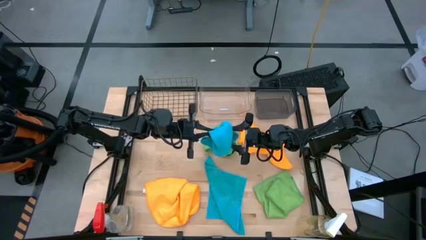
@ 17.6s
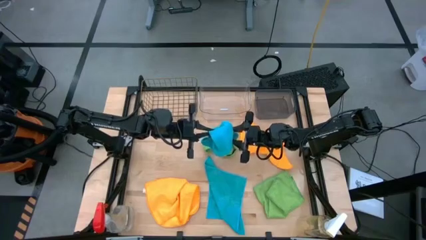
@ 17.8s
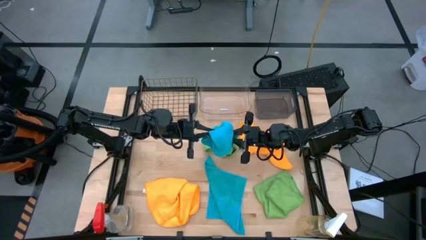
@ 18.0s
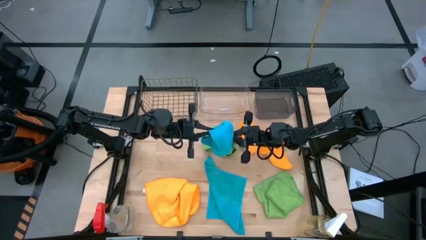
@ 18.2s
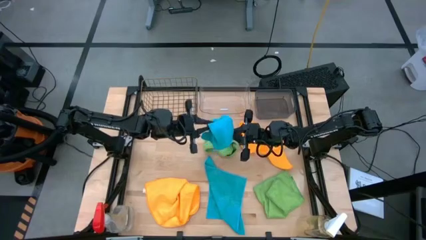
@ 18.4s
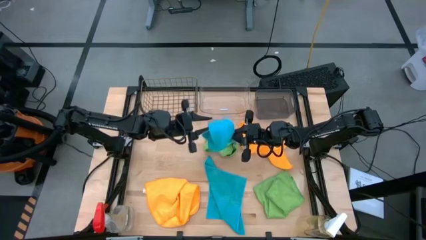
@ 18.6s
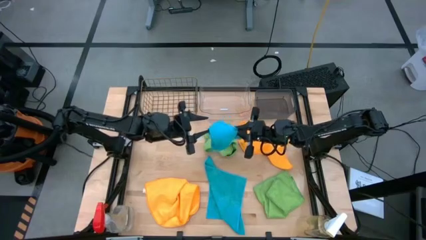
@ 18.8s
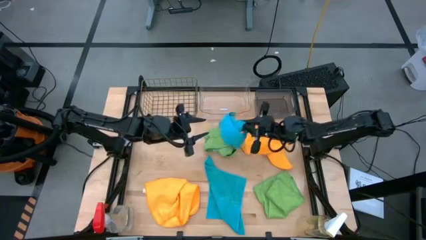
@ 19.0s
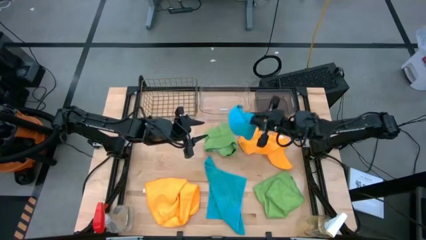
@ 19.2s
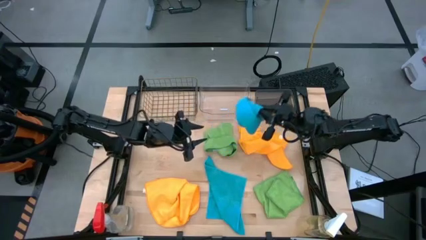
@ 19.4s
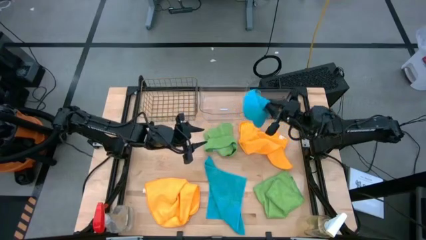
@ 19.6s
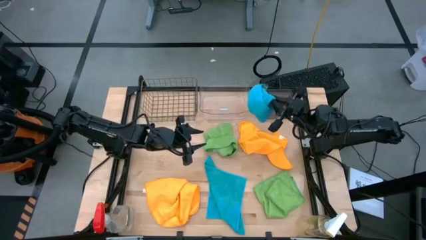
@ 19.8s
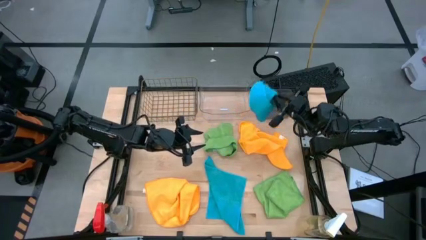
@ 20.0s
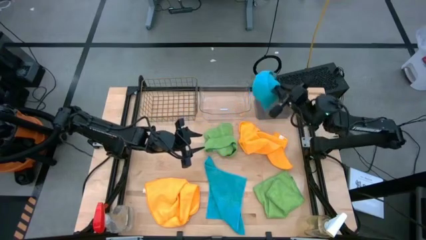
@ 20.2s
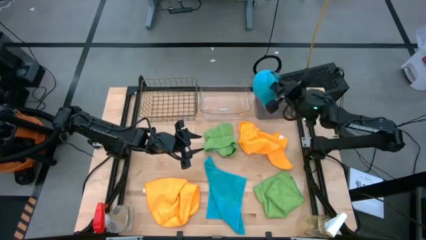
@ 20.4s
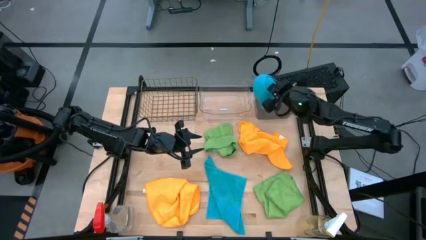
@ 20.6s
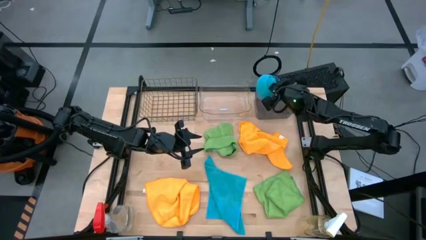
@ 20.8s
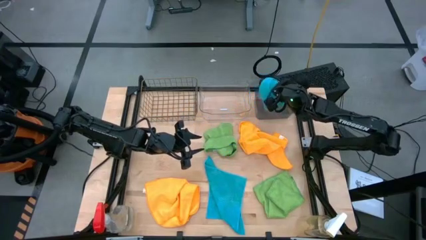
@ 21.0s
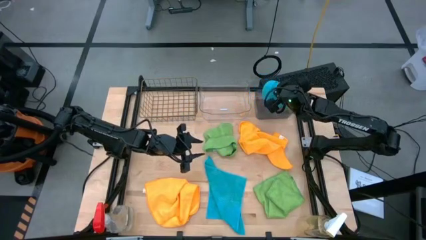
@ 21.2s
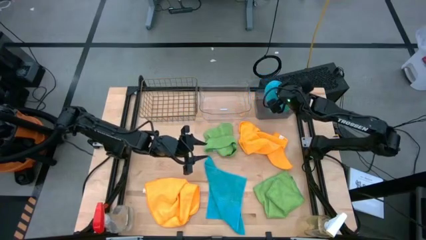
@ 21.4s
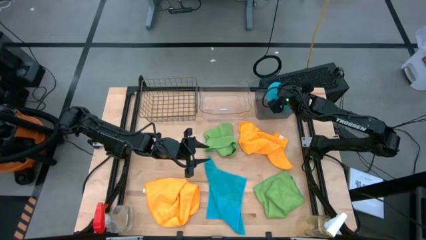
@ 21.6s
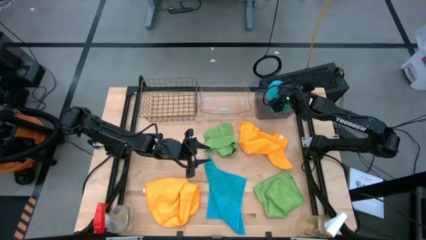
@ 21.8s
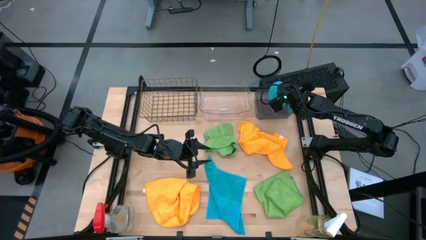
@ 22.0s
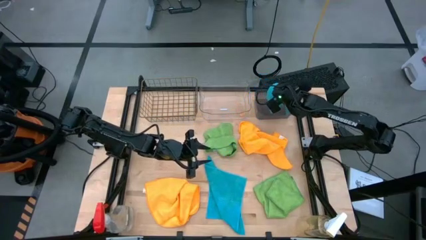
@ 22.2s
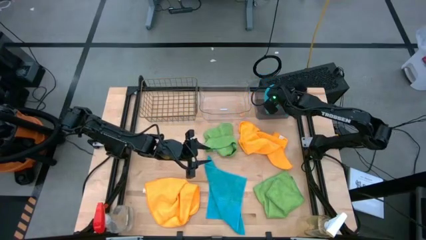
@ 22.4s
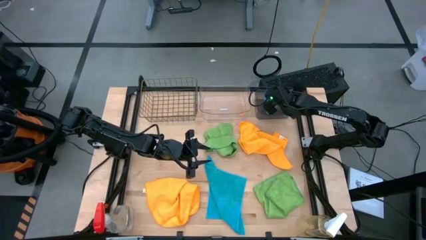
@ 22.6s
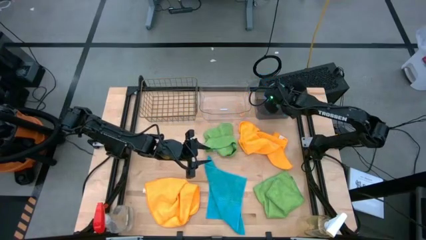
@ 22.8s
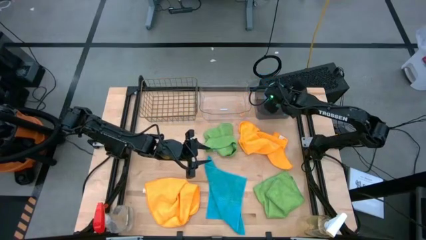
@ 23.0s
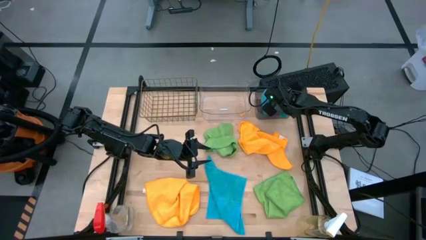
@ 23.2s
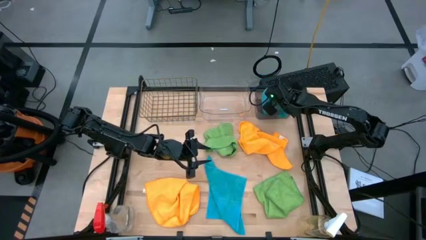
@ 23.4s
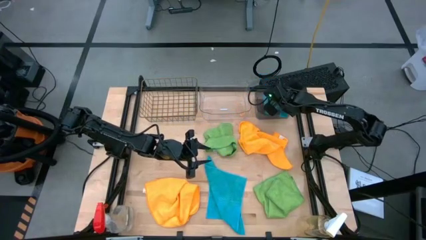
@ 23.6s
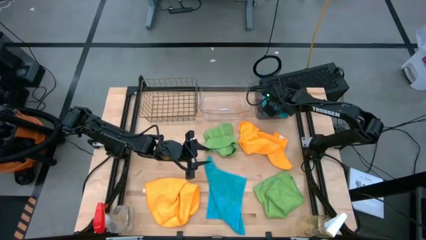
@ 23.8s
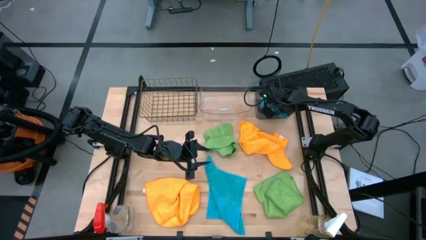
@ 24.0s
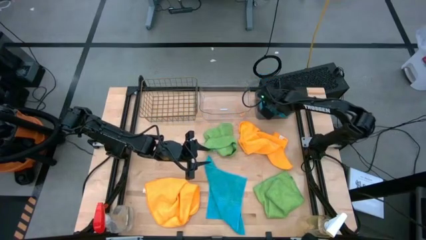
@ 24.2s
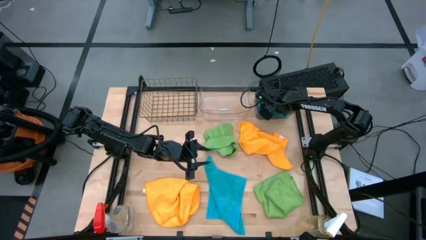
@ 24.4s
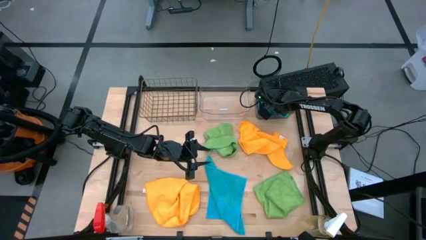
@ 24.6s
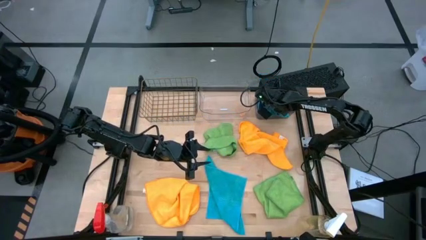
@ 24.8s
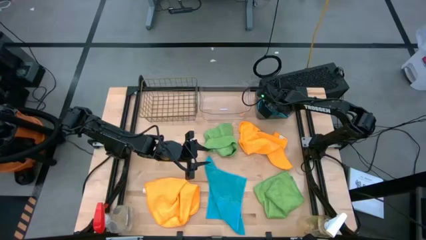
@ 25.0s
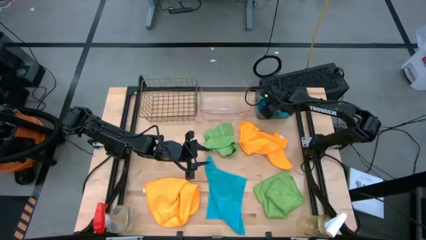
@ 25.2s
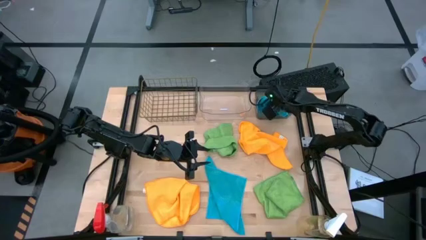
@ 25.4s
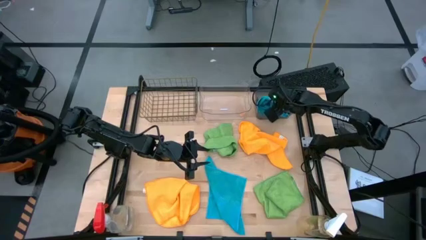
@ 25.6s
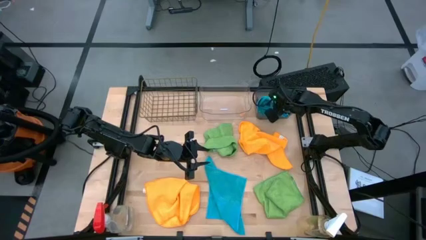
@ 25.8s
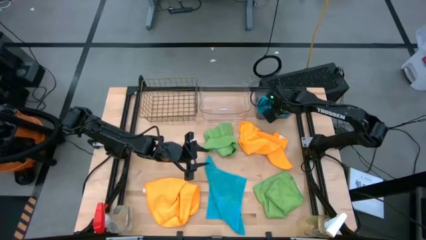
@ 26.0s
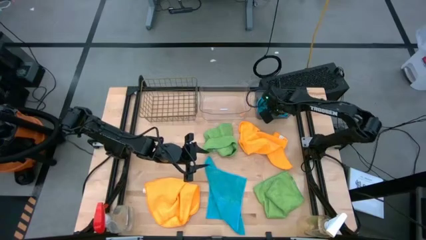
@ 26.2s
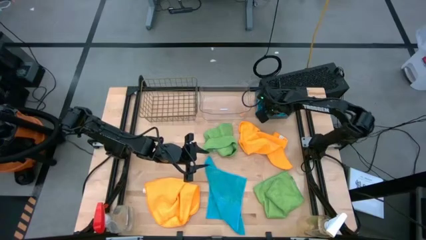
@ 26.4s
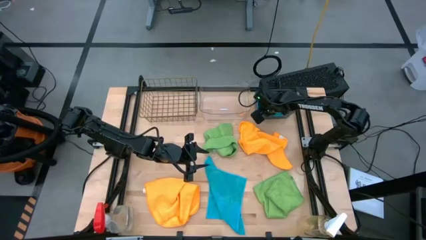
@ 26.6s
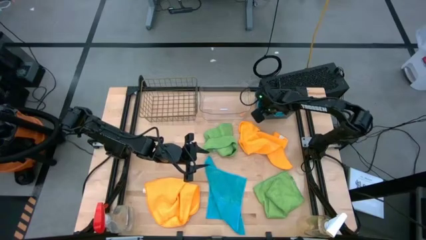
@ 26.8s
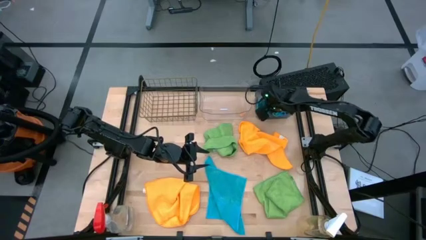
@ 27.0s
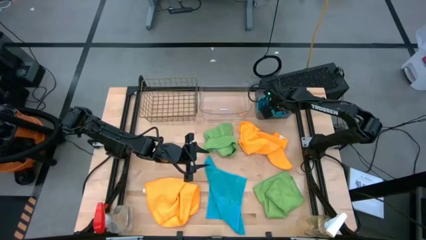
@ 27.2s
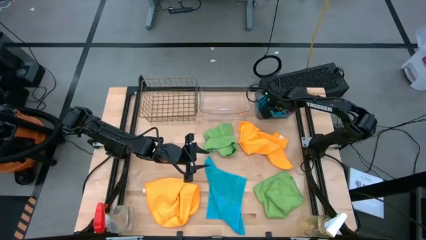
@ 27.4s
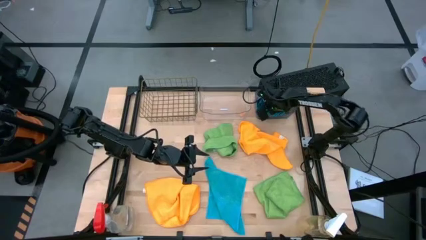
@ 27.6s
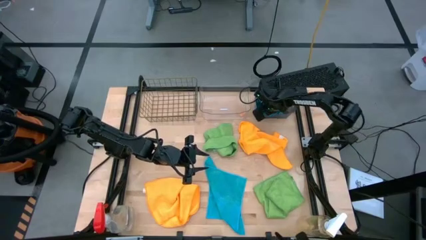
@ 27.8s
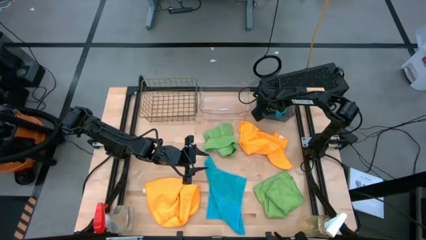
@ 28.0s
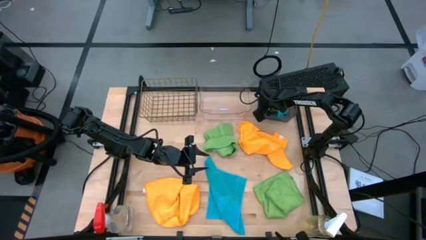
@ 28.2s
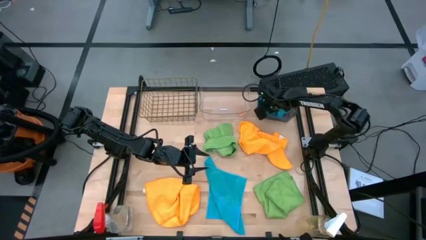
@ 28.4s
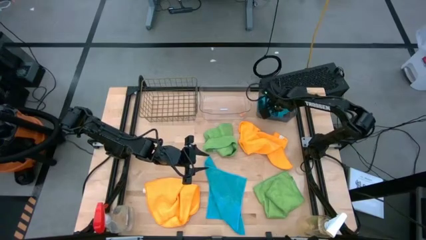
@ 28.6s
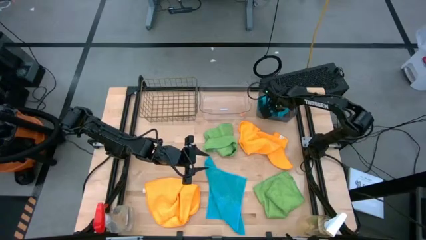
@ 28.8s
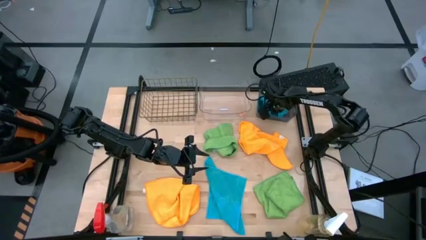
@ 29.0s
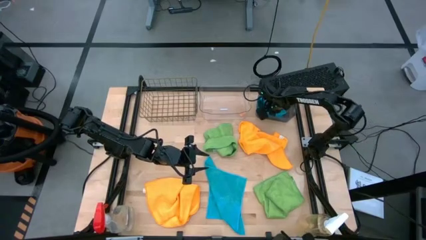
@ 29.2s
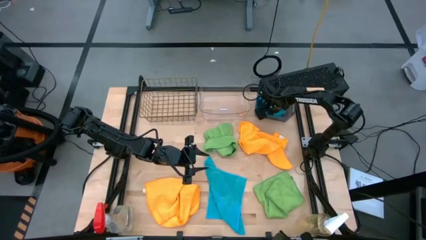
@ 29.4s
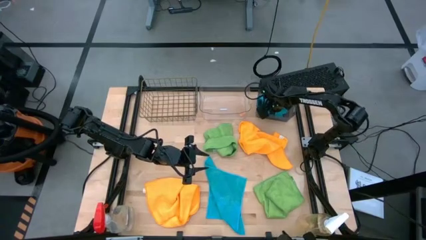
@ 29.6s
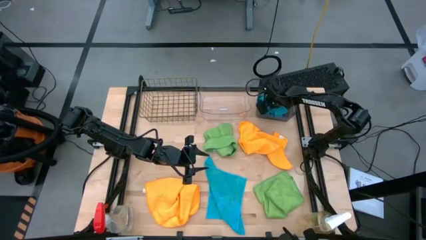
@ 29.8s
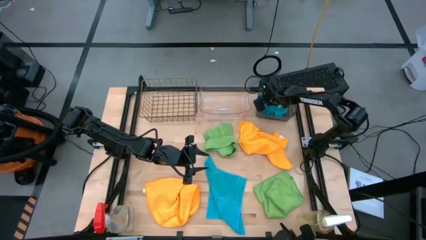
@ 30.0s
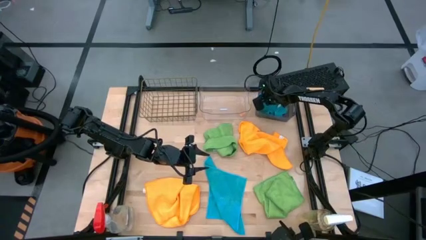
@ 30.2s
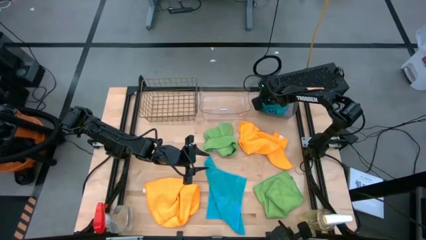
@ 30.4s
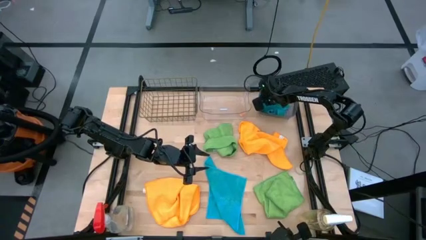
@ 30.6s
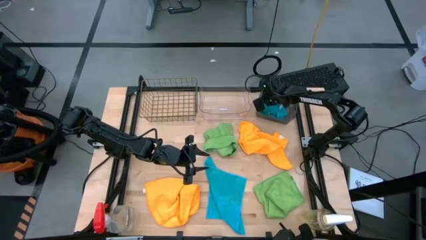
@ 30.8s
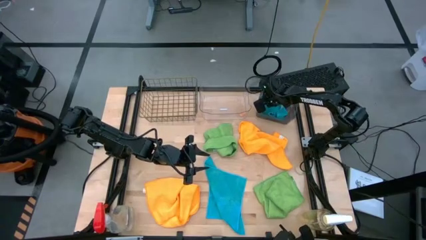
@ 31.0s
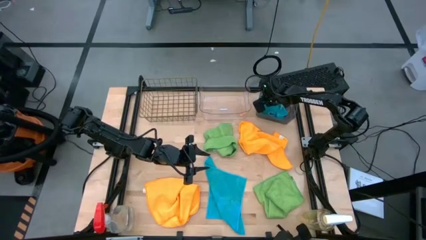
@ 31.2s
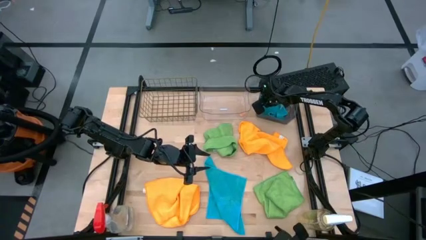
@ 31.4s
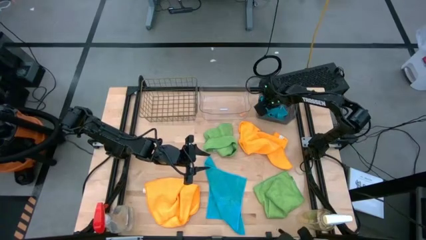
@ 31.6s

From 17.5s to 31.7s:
Task: Sort microfiber towel by color & place in baskets
Put the left blue microfiber towel into the black bin

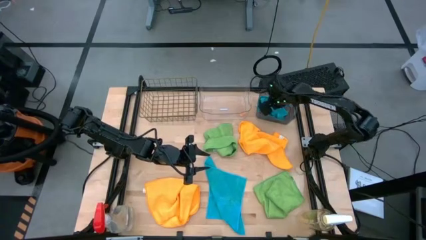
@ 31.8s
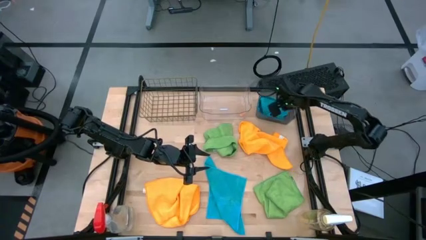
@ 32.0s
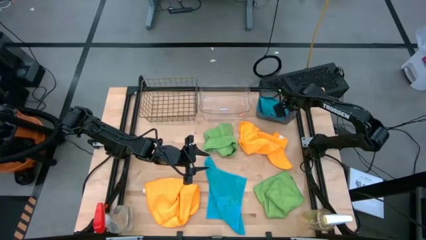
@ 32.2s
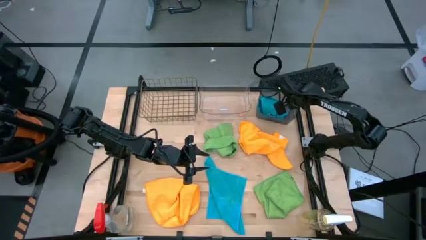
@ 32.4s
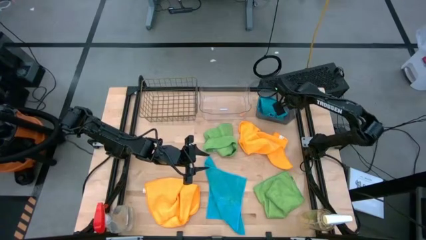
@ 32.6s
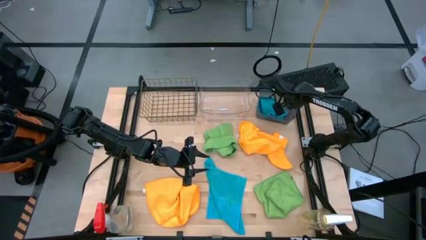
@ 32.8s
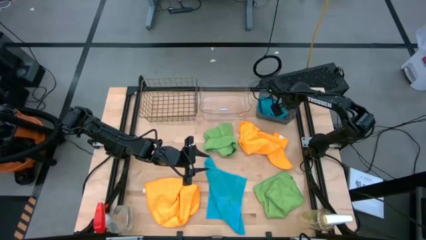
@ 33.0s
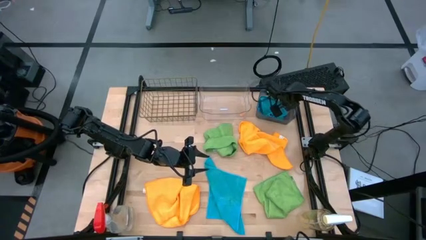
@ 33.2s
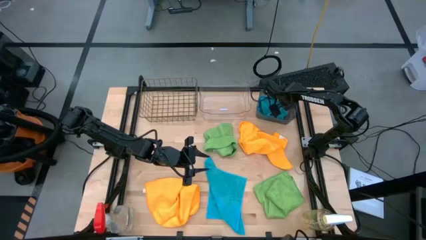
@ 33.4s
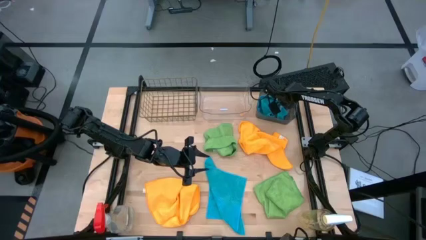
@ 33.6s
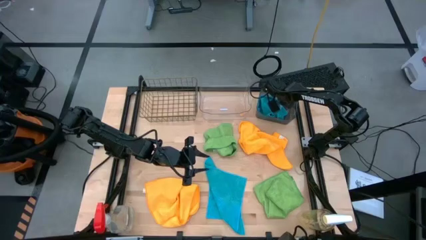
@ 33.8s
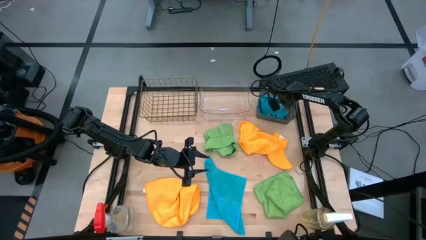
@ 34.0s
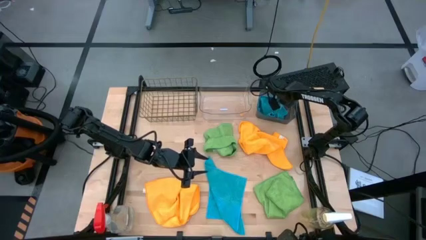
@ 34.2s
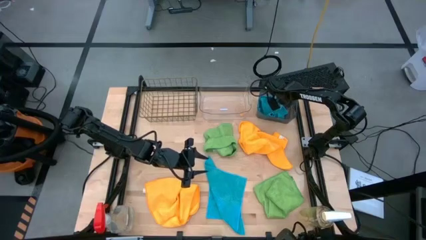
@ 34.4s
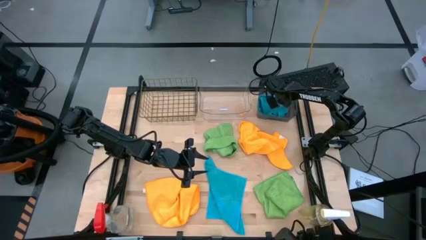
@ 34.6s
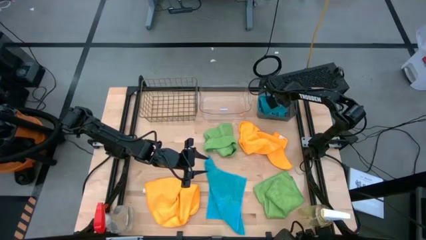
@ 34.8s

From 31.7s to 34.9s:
Adjust the black bin
